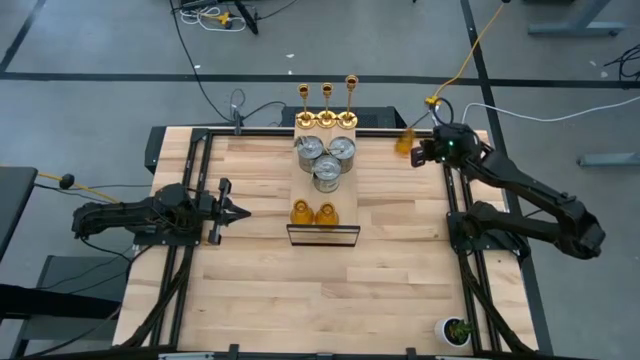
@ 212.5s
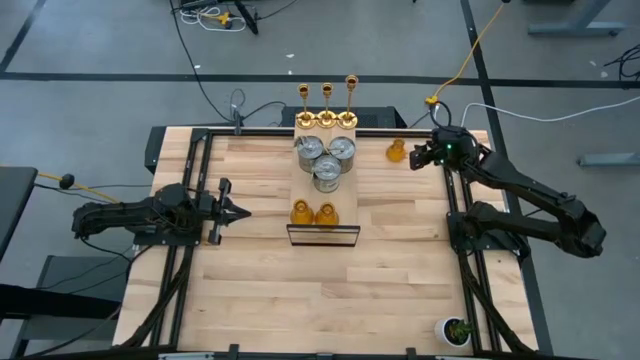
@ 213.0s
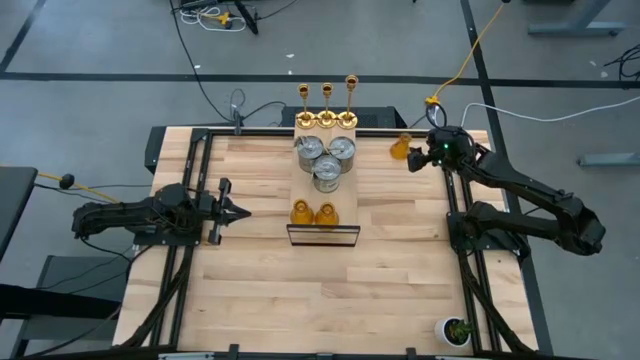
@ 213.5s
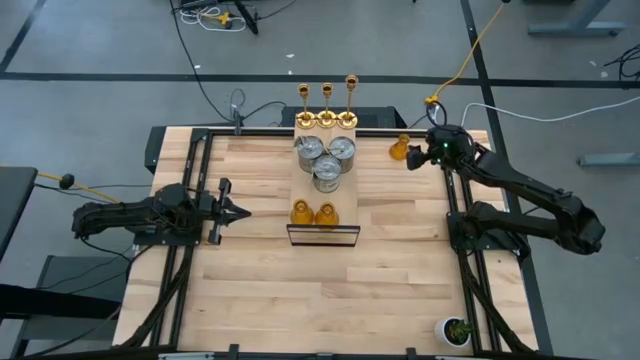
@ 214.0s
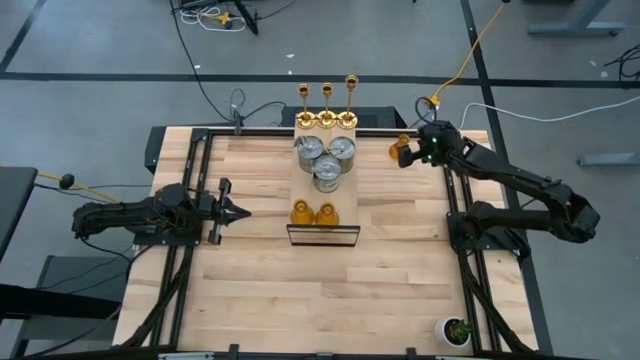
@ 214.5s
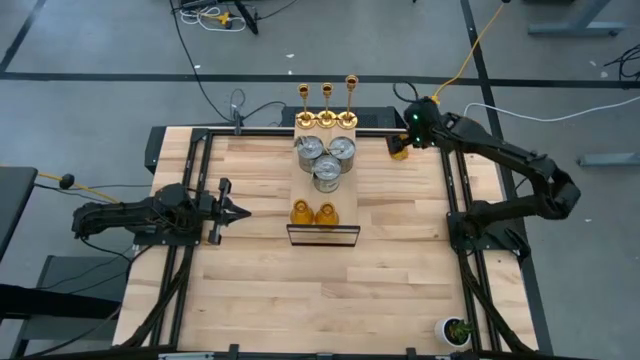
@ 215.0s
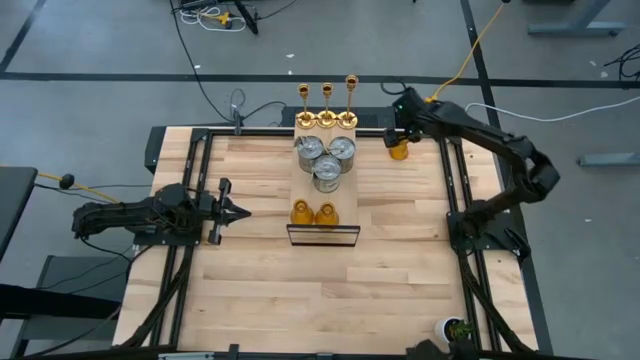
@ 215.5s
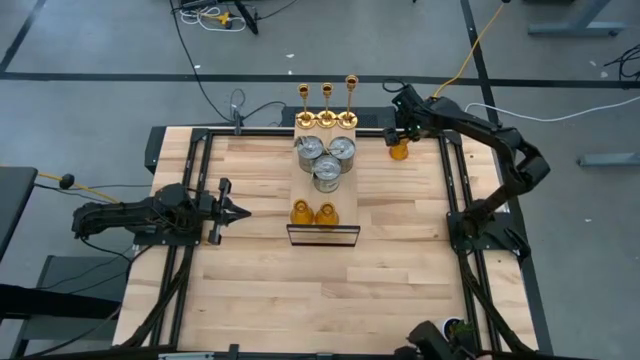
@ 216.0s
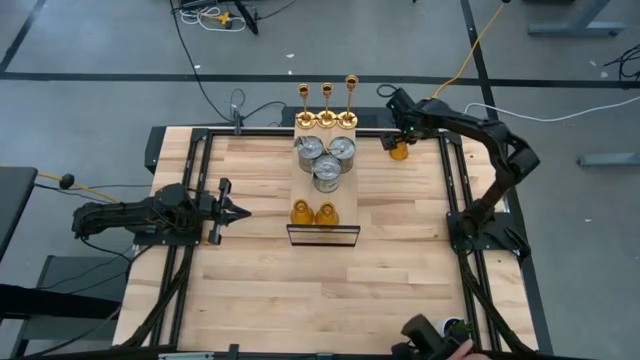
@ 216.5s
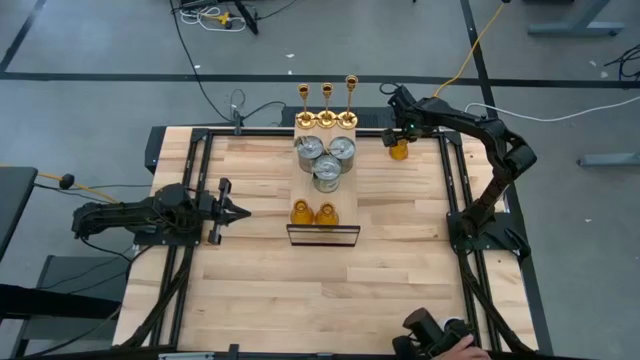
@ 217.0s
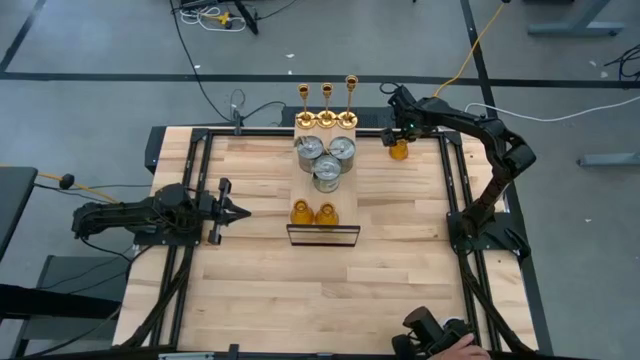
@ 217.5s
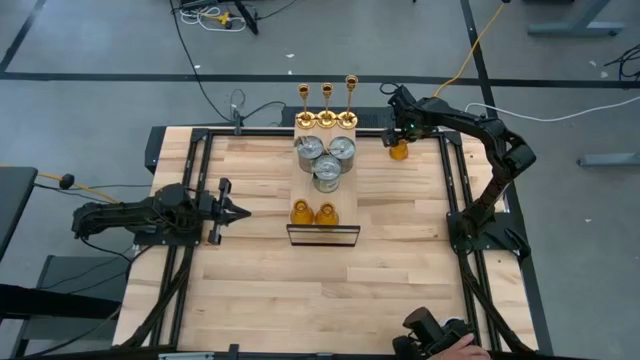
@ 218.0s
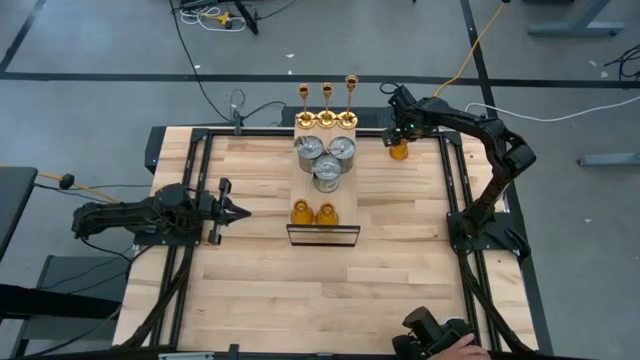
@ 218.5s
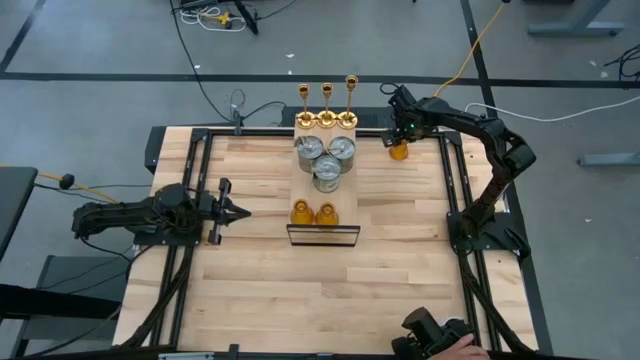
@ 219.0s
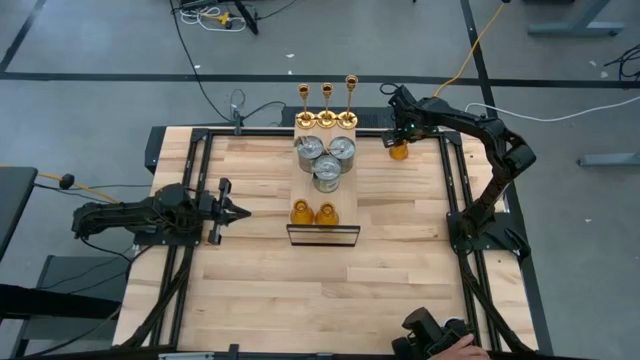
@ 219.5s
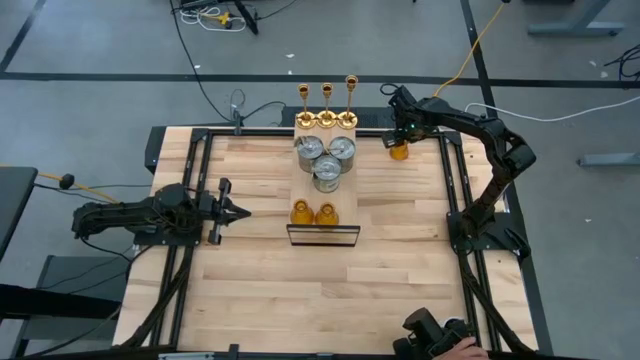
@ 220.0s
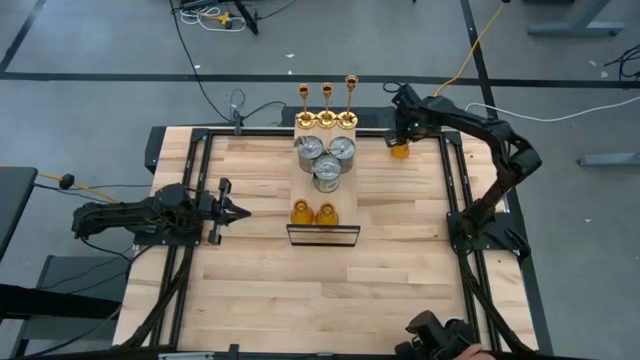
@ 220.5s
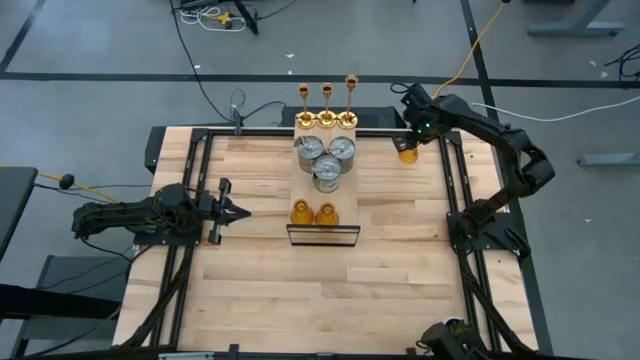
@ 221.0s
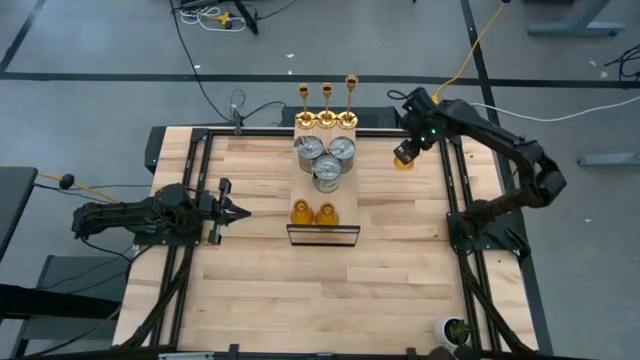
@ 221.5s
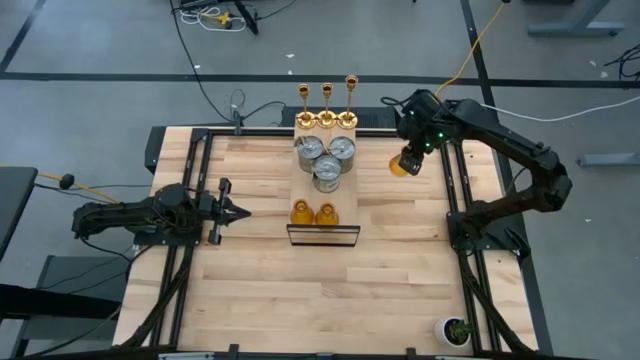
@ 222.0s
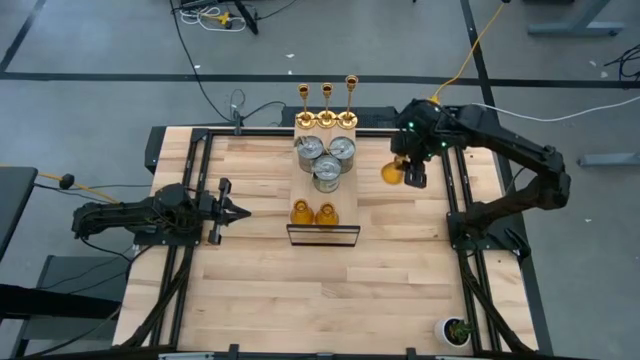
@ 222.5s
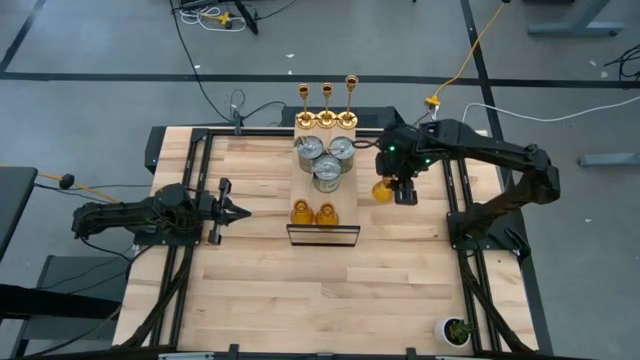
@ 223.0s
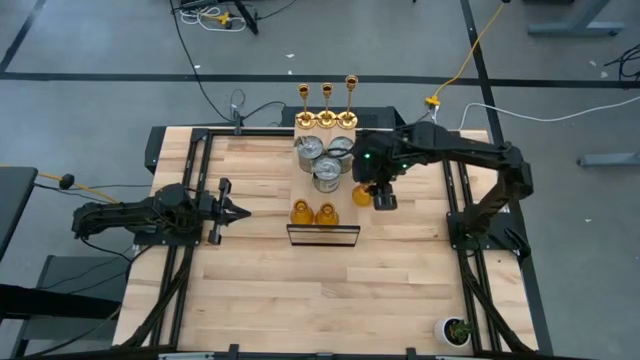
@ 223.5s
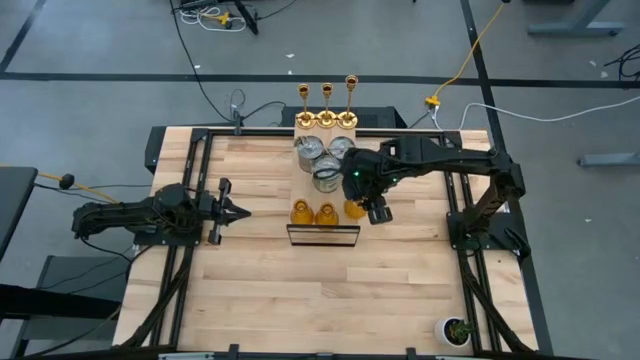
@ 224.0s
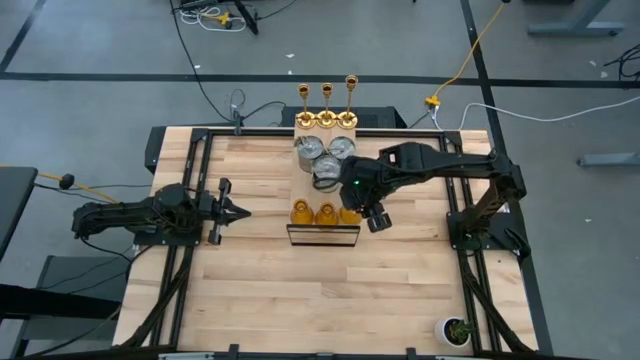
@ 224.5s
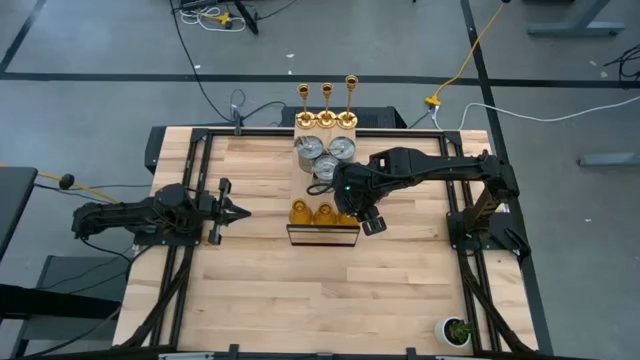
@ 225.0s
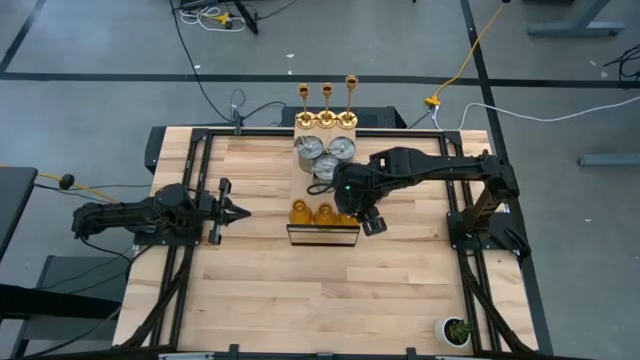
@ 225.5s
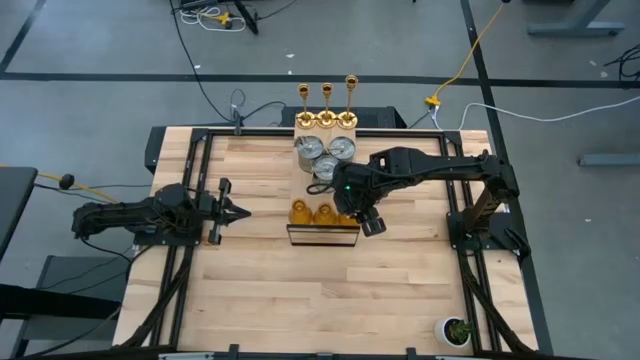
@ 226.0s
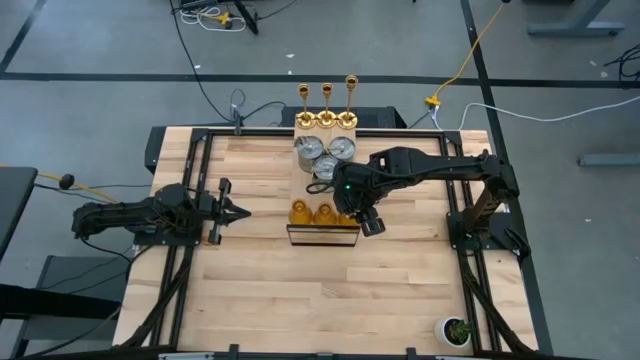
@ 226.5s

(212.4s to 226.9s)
Task: Pick & Place candle stick holders
Put the orange glass candle holder aligned with the other glass candle holder on the shelf

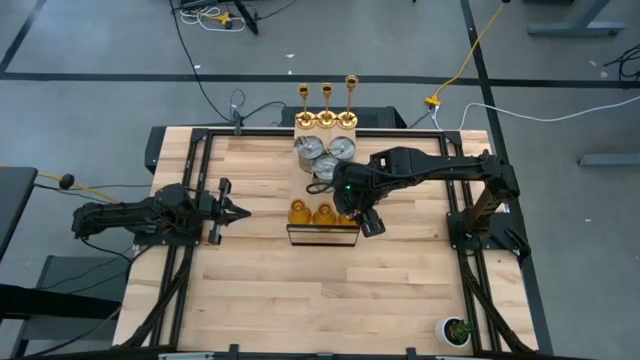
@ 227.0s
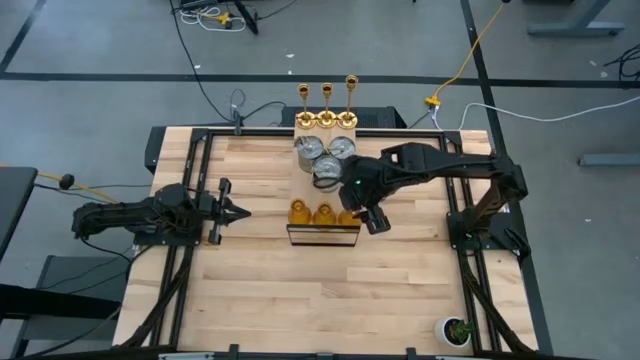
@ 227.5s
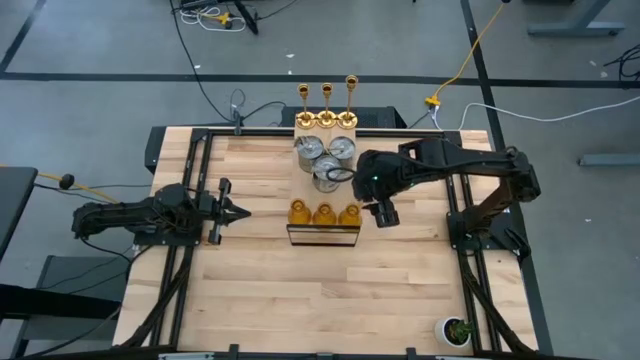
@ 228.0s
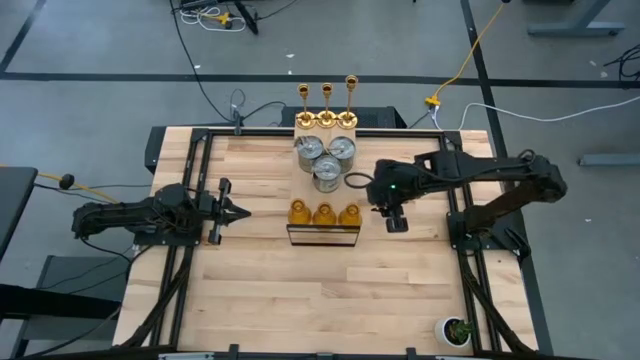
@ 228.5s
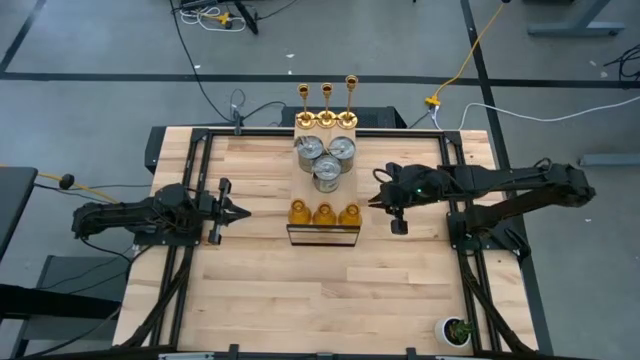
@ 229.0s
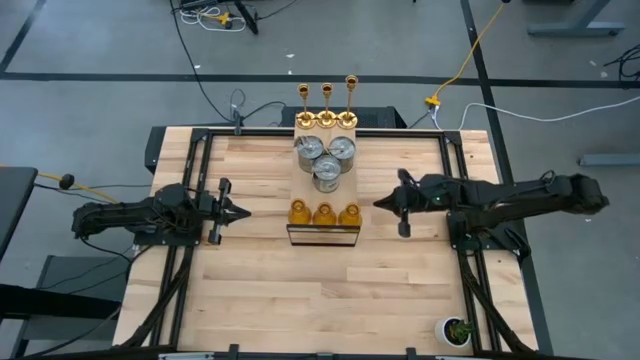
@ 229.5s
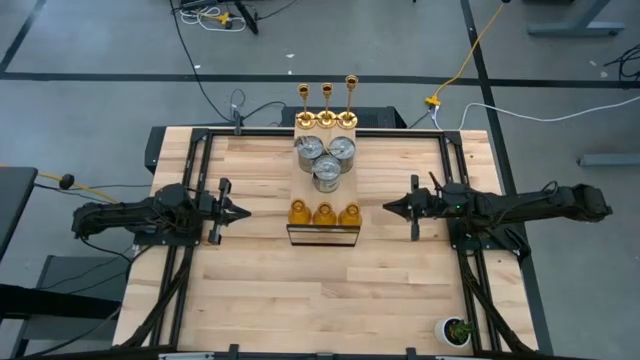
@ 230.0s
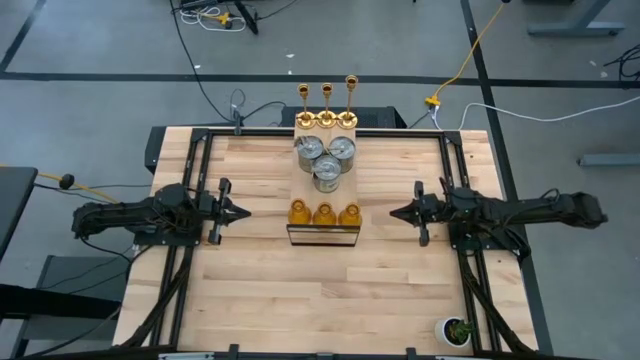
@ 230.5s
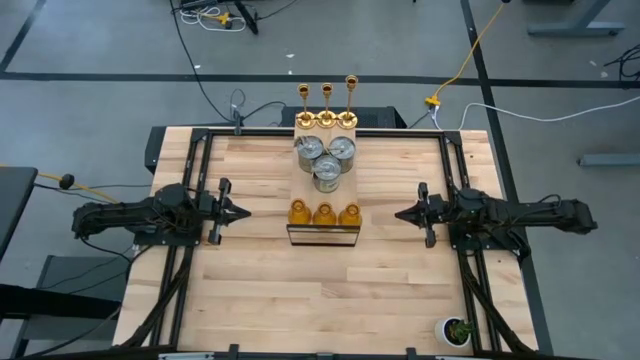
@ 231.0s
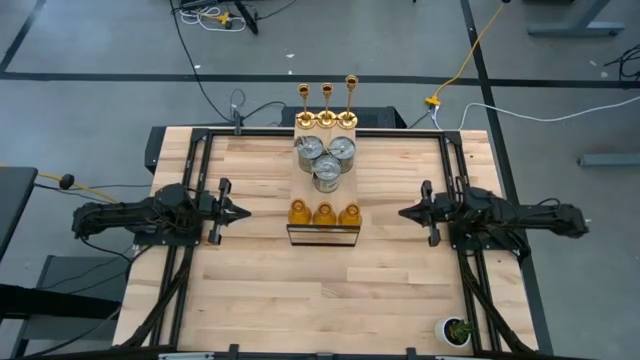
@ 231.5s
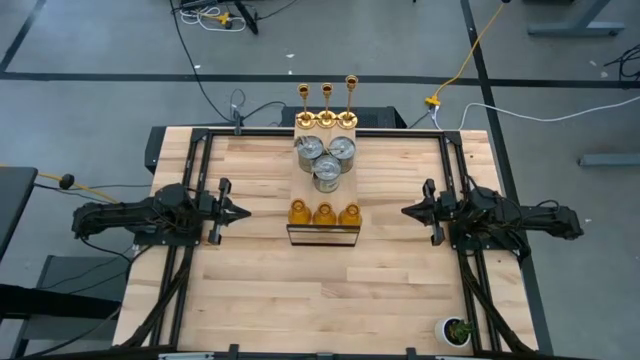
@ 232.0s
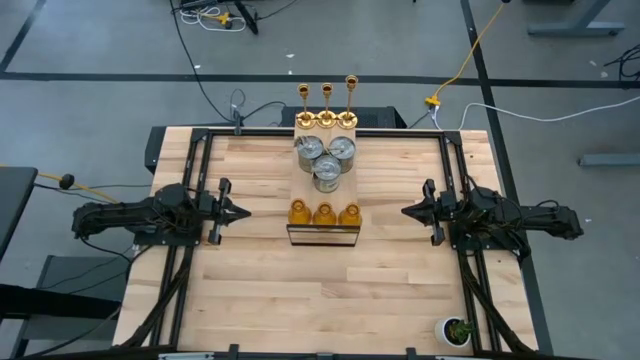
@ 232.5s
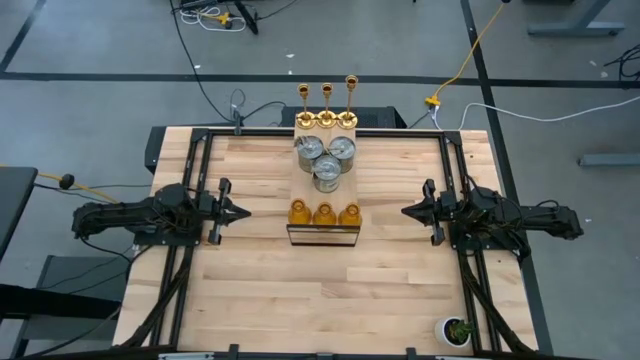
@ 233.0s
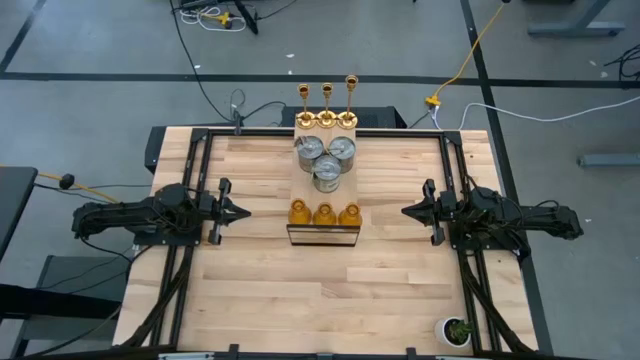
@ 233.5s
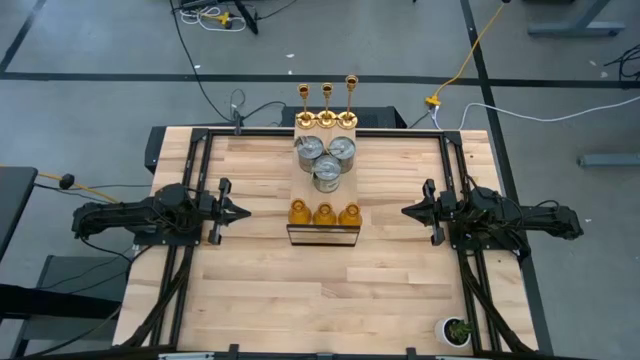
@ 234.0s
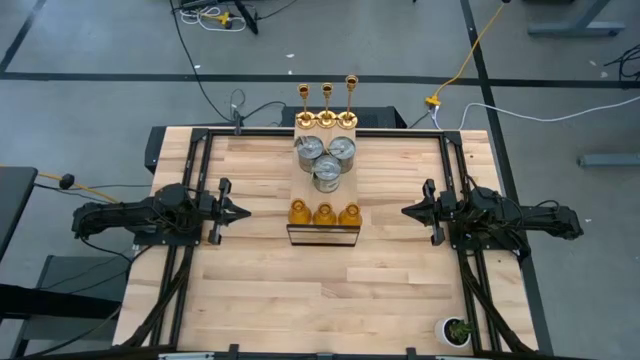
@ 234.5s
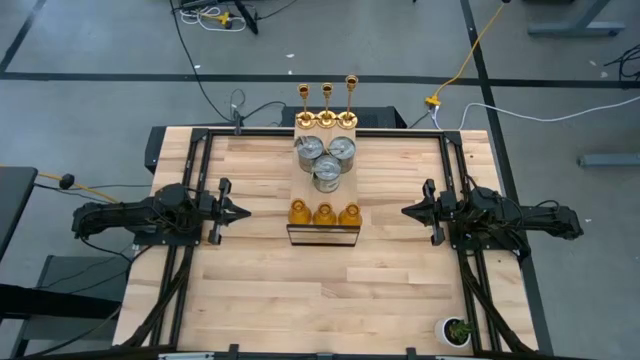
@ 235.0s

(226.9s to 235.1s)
Return to Home Position
